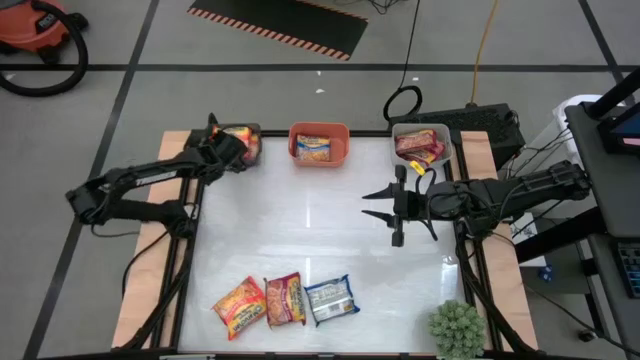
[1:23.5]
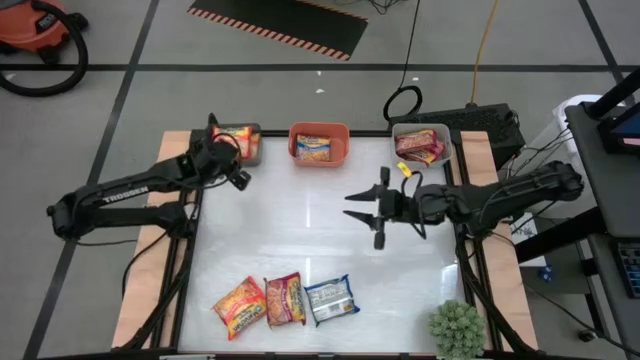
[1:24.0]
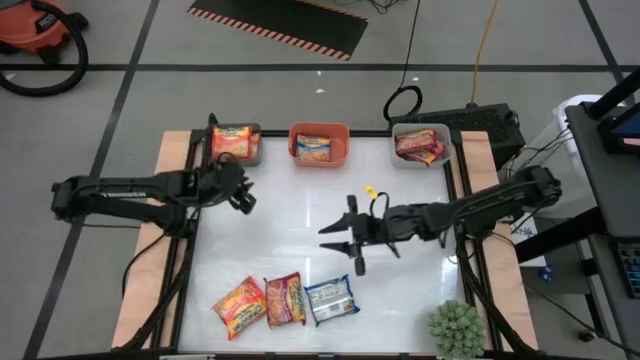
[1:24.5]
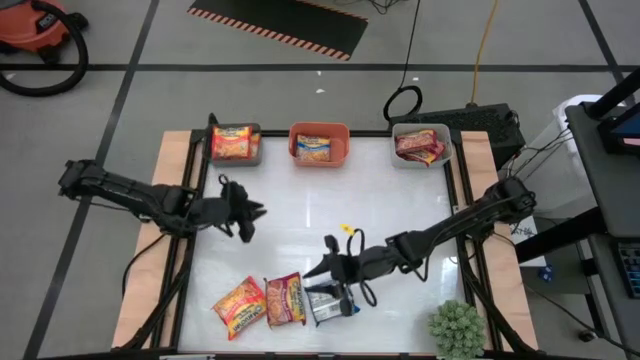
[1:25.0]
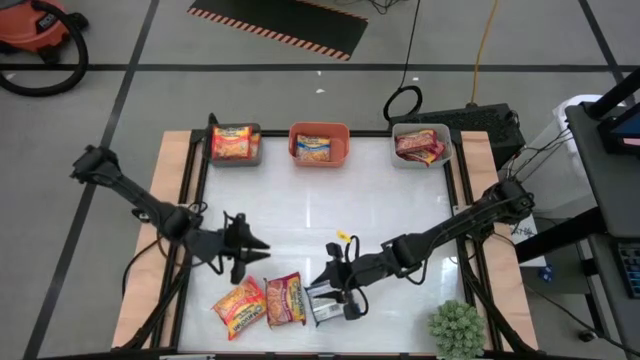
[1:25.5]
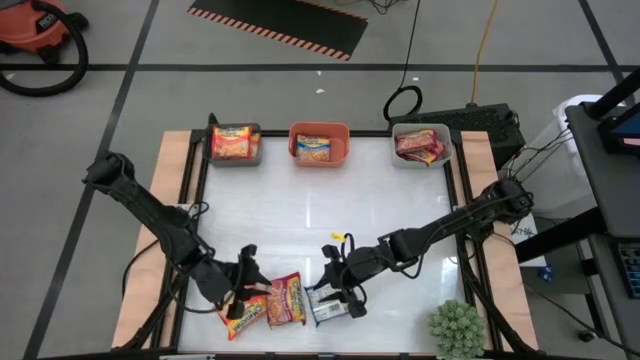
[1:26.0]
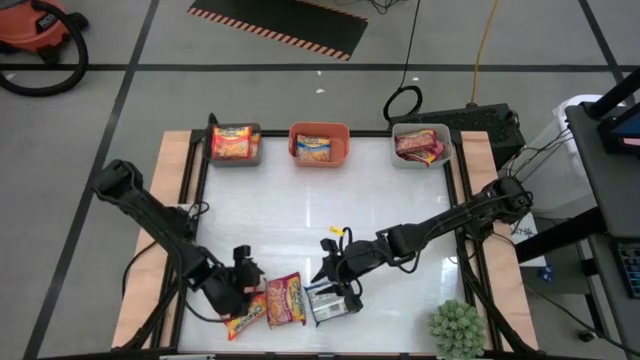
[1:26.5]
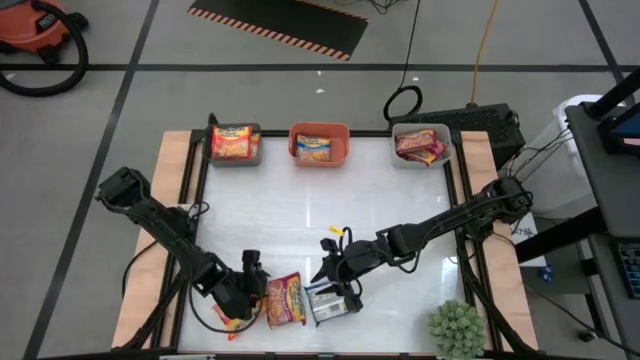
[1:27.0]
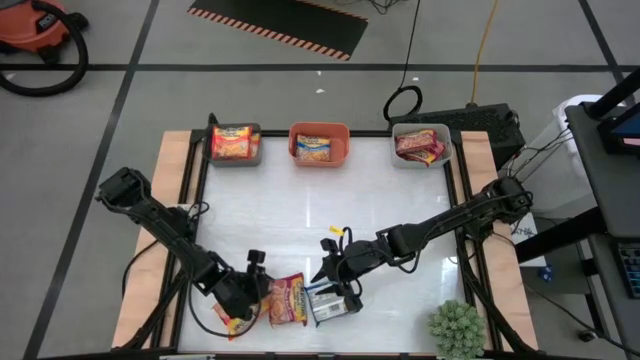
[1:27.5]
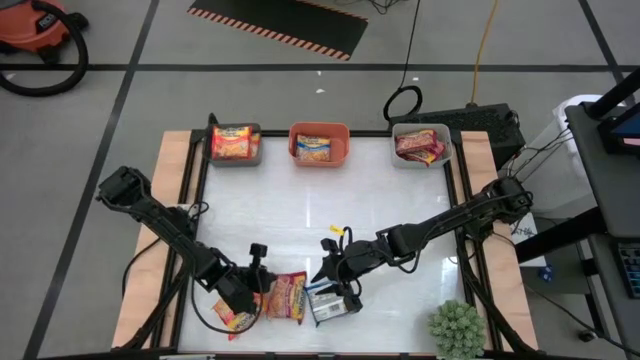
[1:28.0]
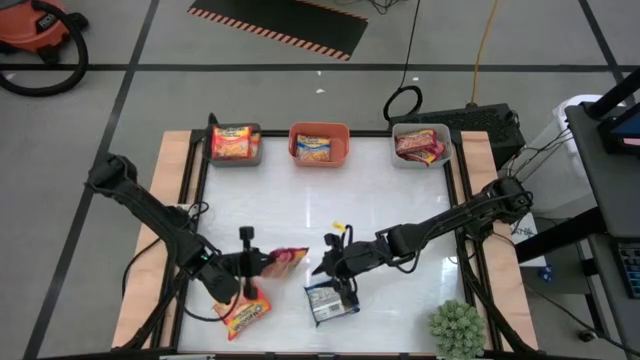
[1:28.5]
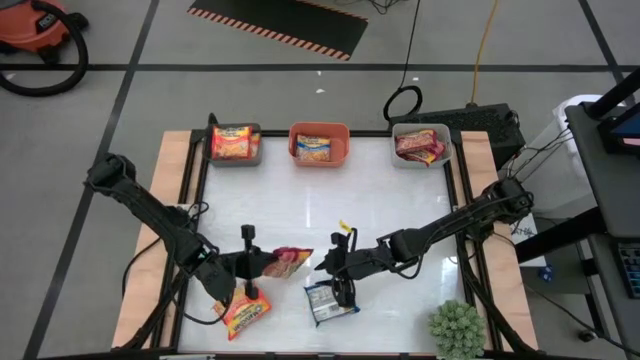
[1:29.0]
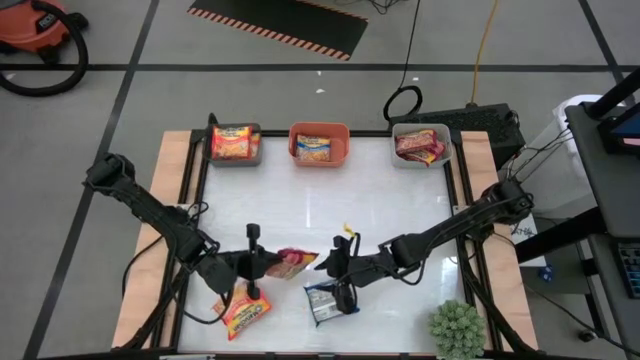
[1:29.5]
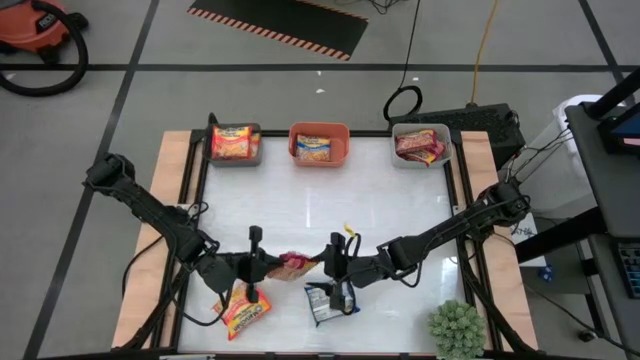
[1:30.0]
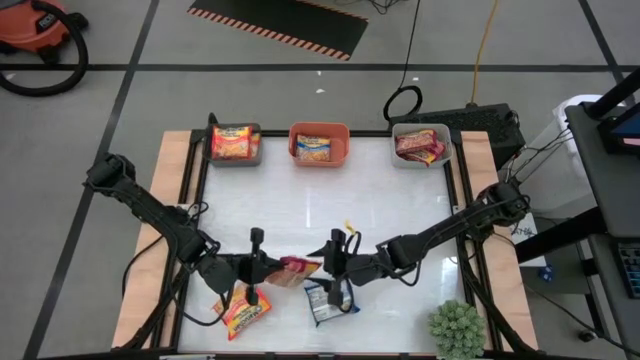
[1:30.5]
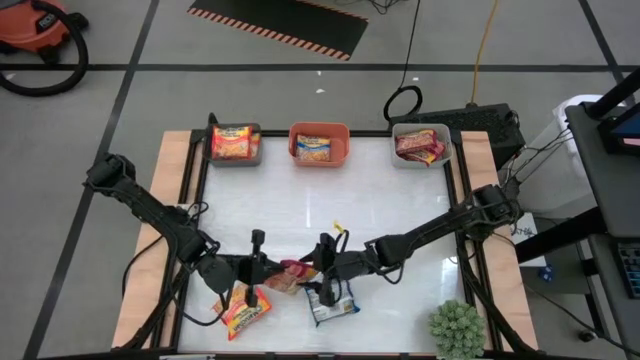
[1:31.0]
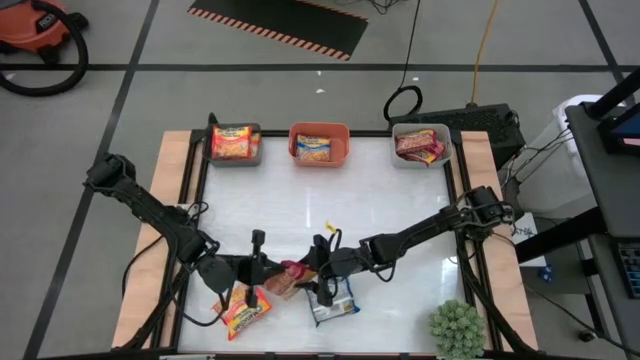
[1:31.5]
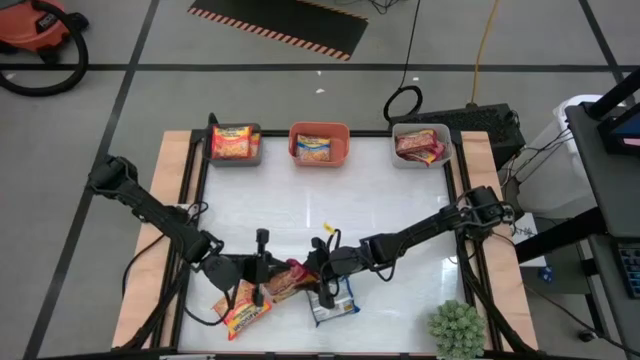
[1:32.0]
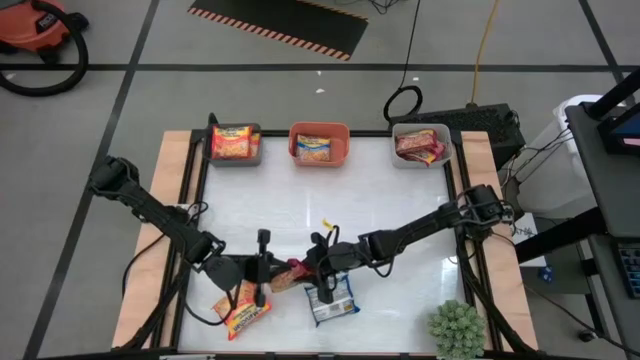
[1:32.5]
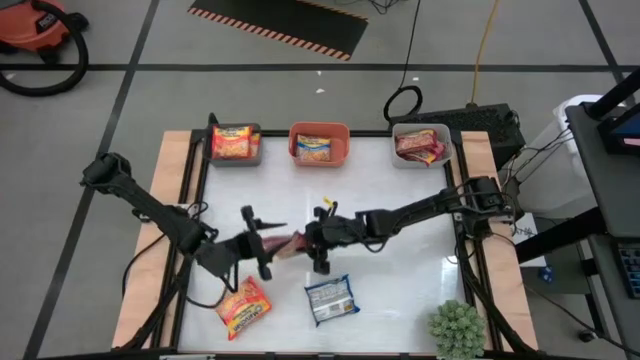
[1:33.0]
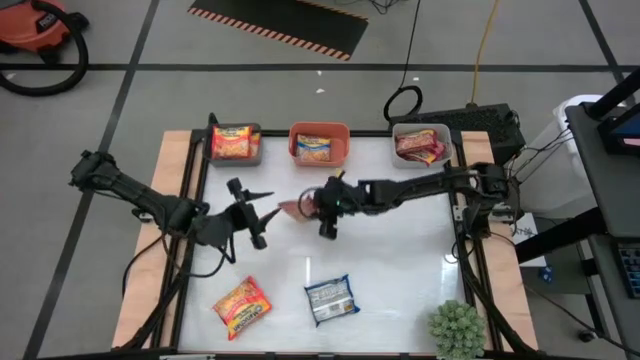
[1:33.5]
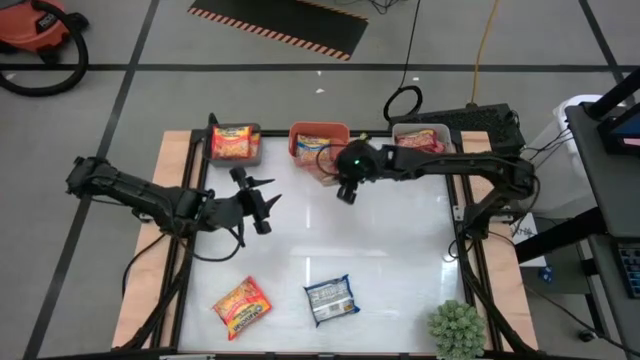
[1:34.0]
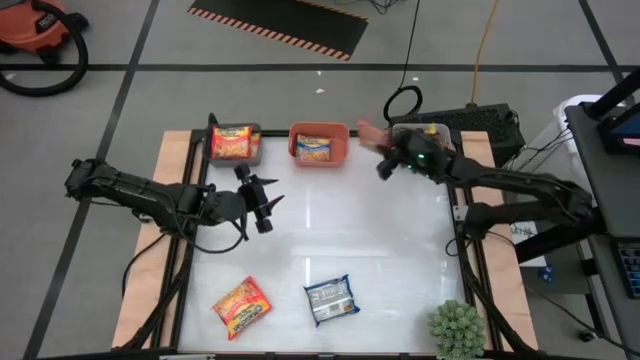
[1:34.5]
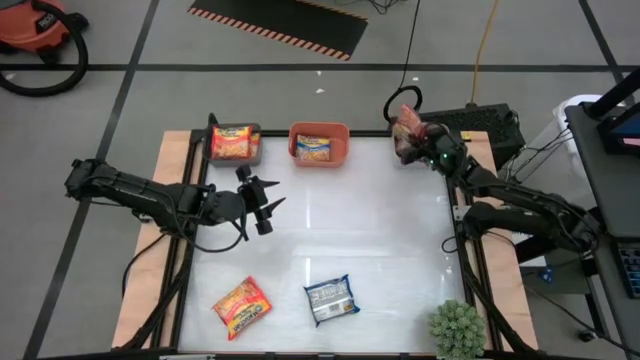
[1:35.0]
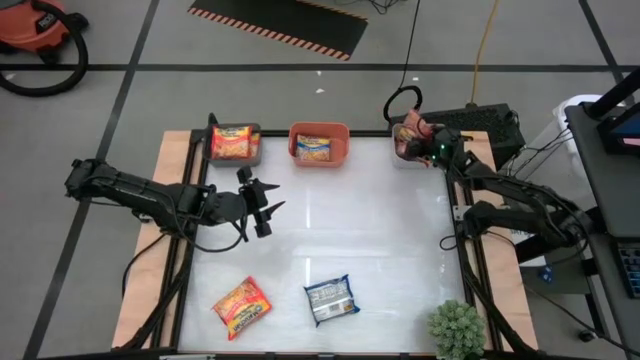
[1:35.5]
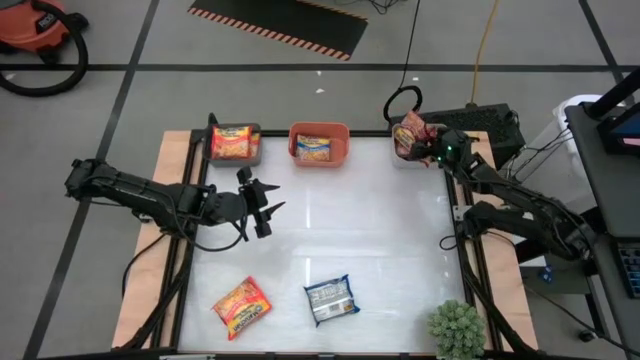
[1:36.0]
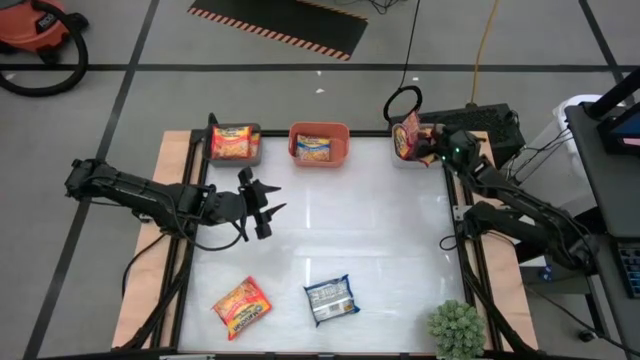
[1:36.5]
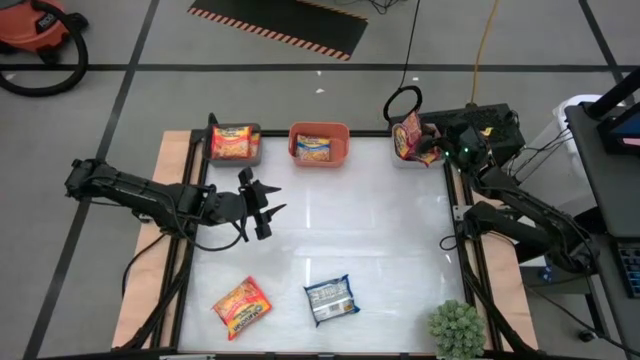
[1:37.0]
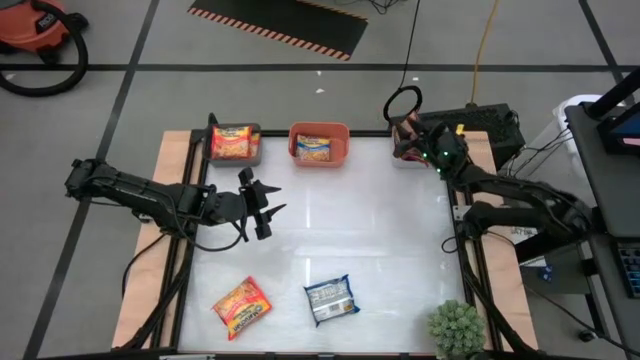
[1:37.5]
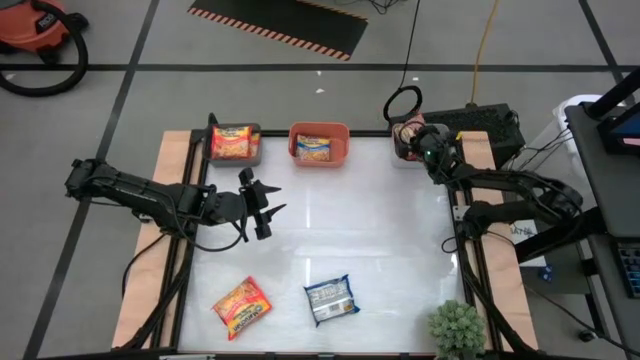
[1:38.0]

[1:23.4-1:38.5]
Task: Sort Maruchan noodles
Put the red noodle pack into the gray bin

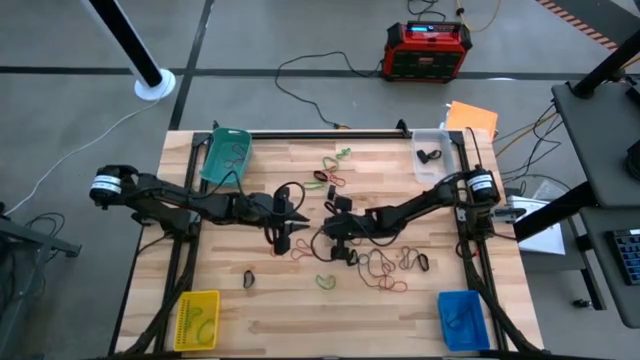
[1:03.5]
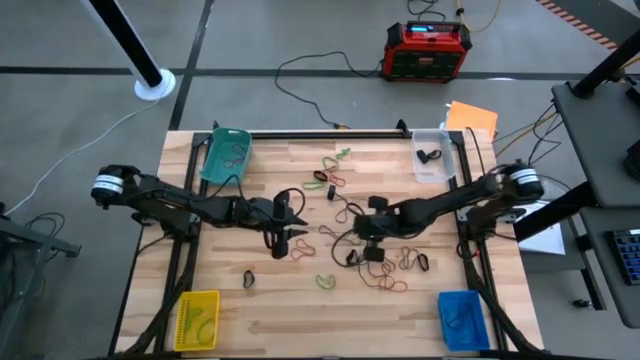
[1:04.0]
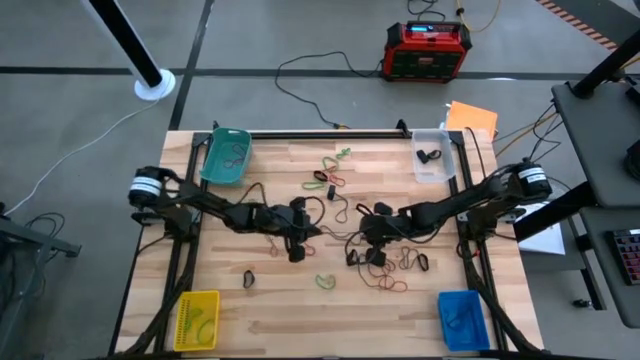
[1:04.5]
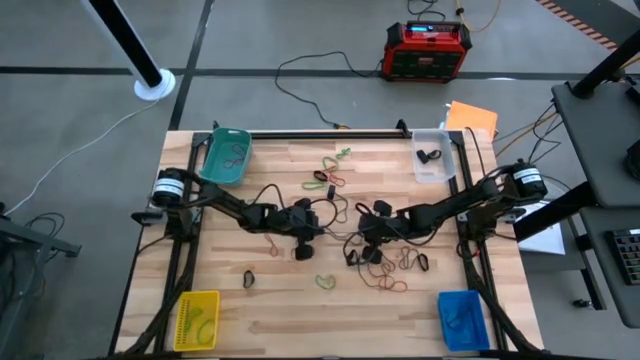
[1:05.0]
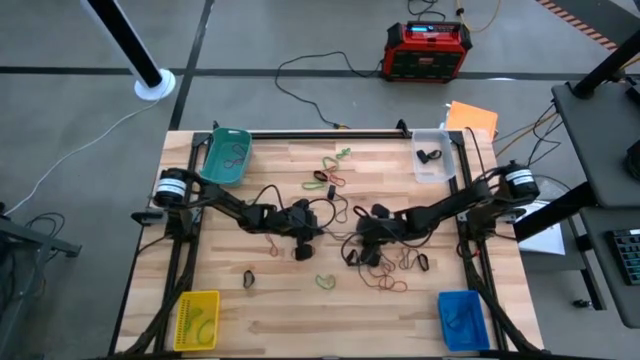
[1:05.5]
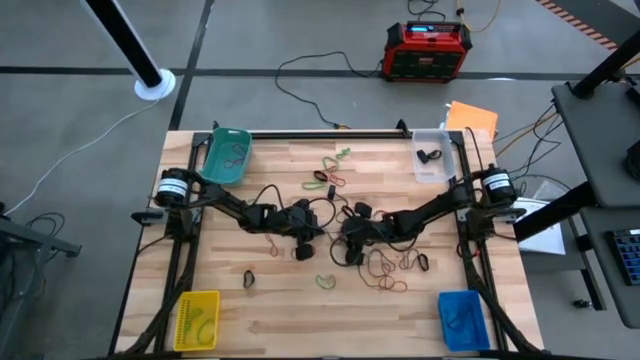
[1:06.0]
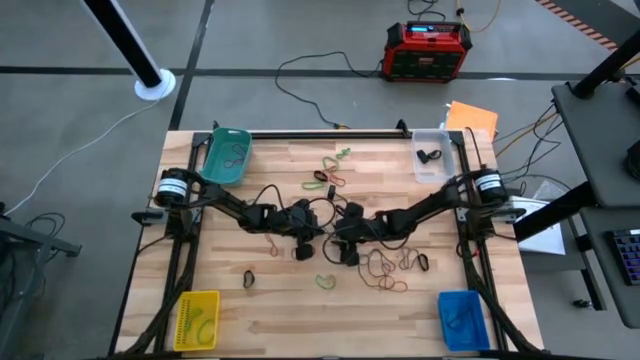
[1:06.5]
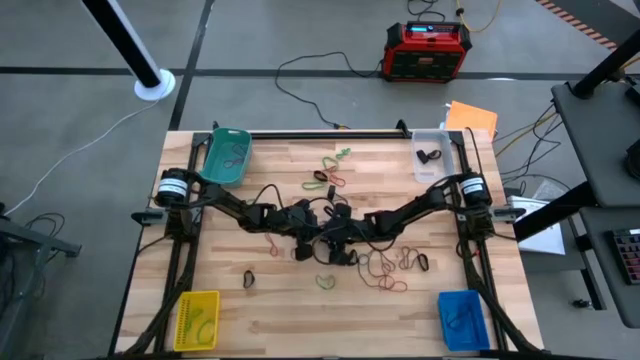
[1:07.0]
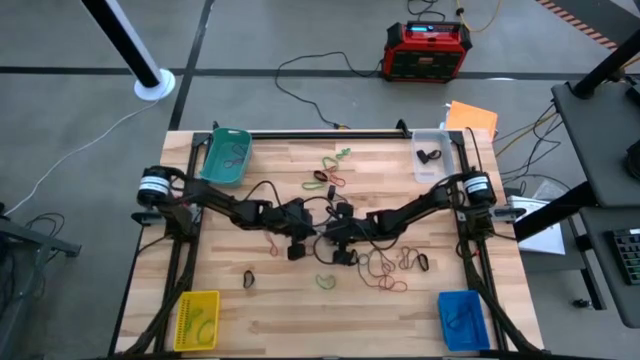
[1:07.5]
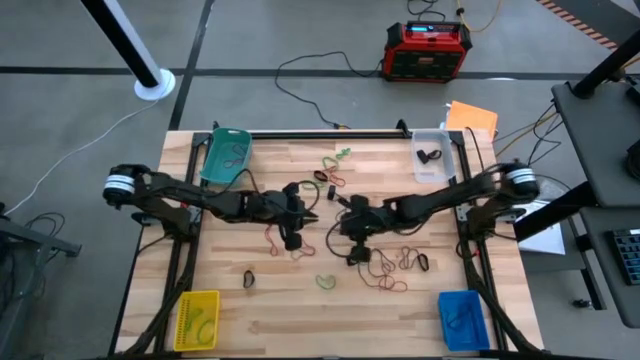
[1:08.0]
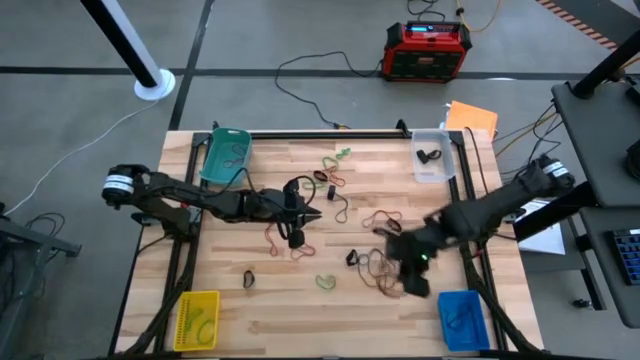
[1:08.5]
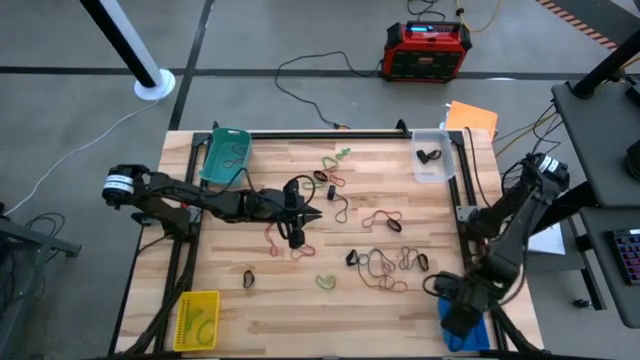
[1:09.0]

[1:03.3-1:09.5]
Task: Sort rubber bands into baskets
Put the violet rubber band into the blue bin
